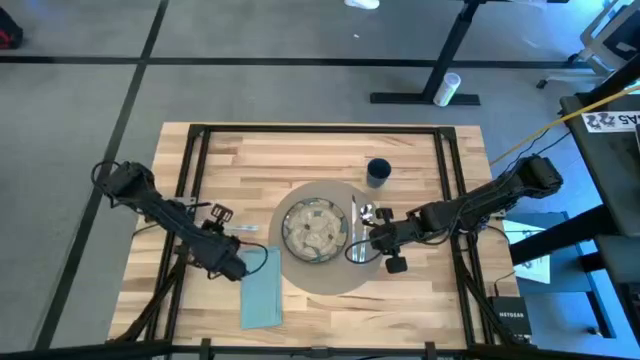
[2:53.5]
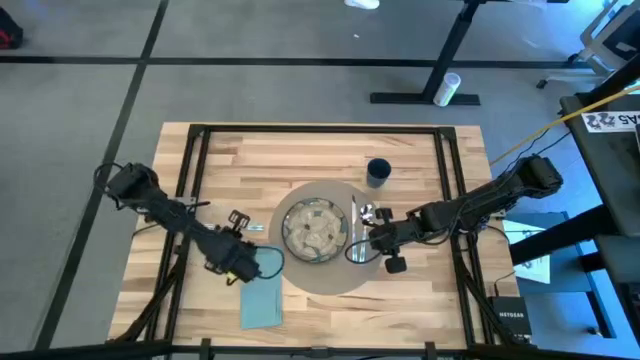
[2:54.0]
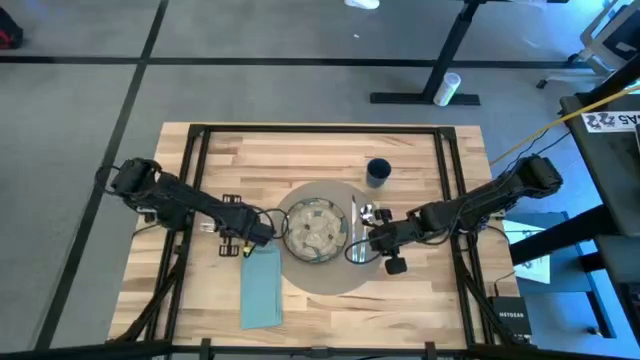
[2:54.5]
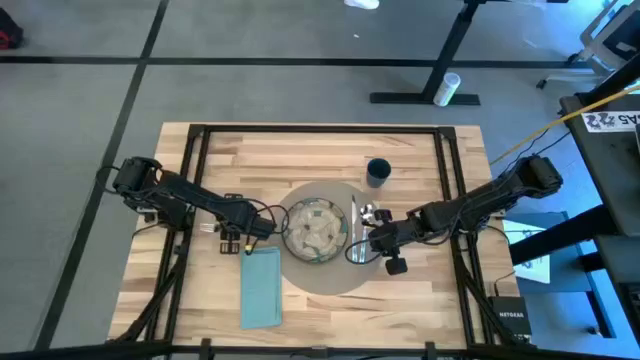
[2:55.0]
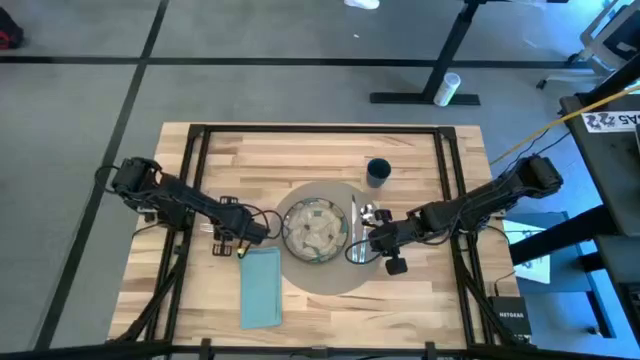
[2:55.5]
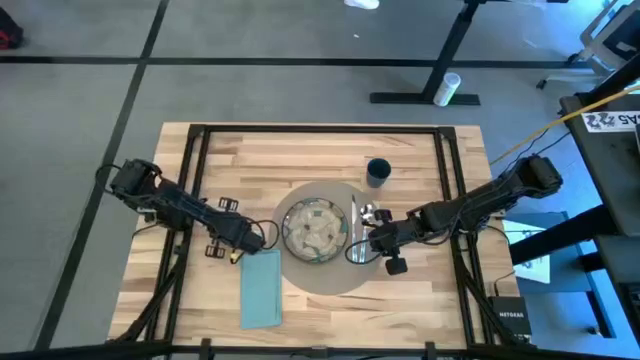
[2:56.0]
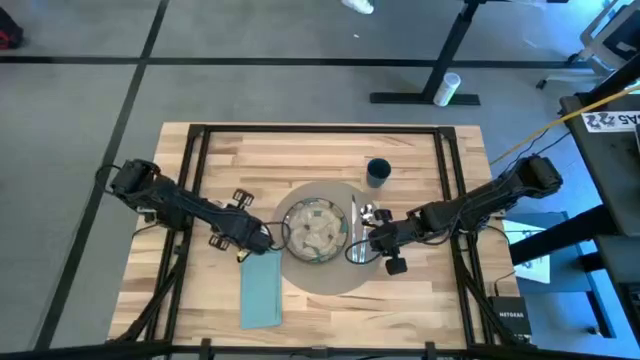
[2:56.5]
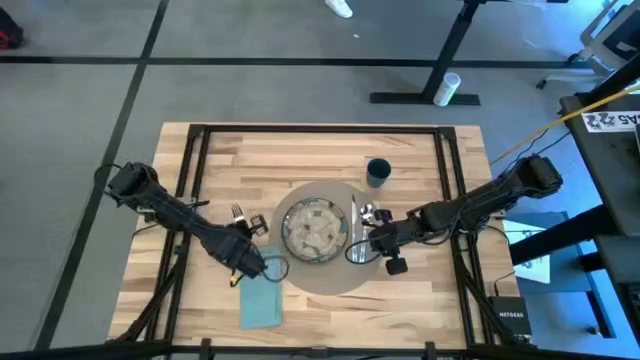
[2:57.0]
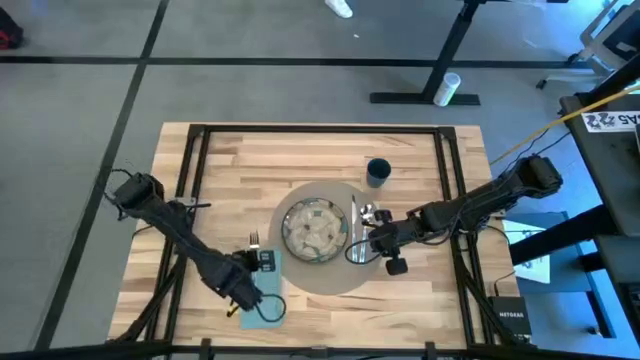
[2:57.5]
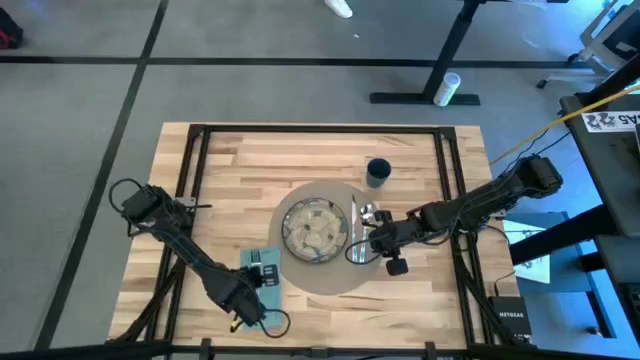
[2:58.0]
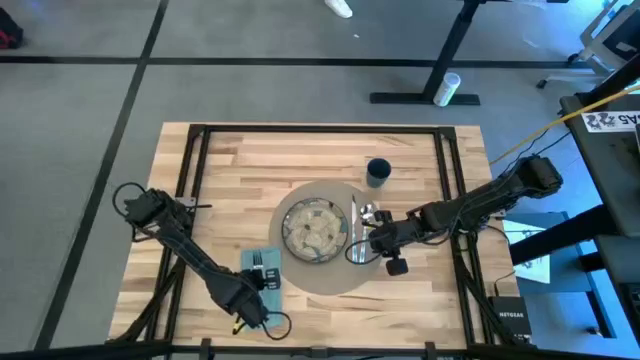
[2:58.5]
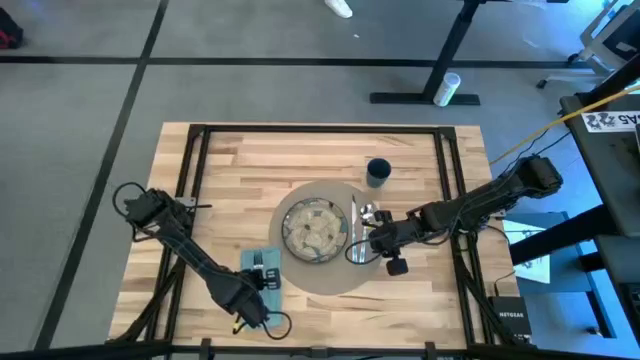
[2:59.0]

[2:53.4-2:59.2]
Task: Set table place
Put the blue patterned fork on top of the blue table napkin

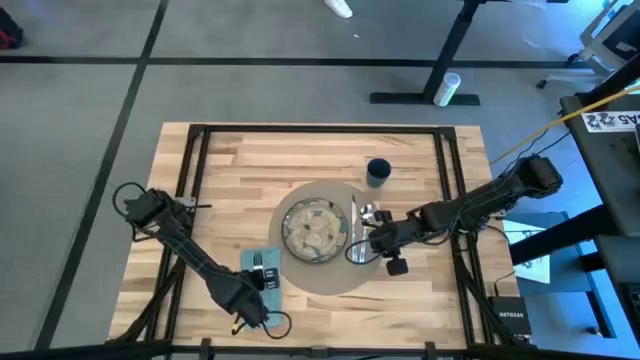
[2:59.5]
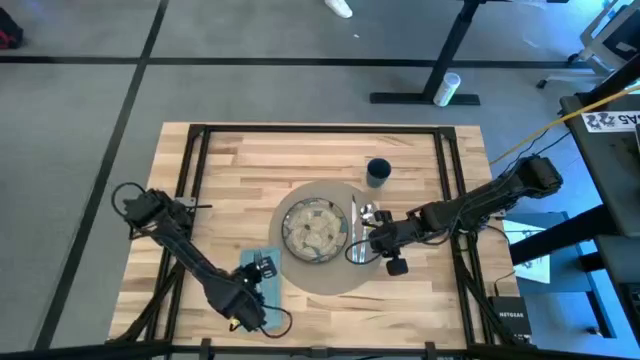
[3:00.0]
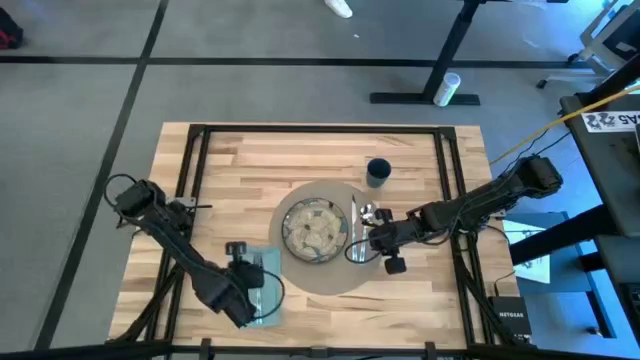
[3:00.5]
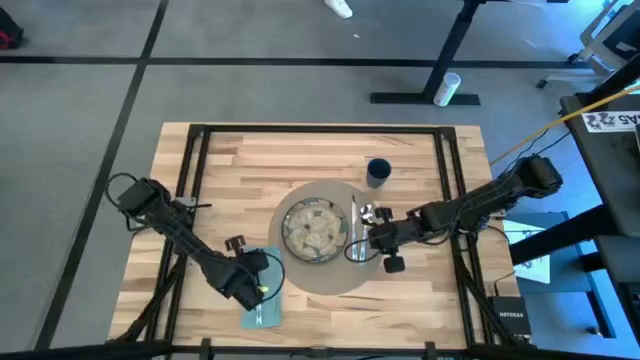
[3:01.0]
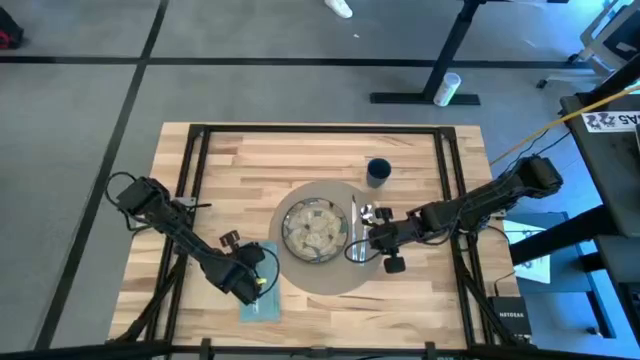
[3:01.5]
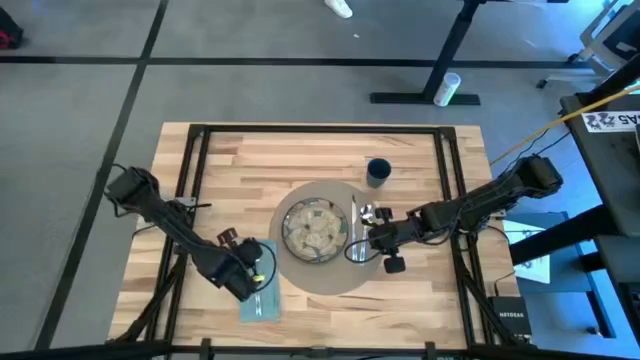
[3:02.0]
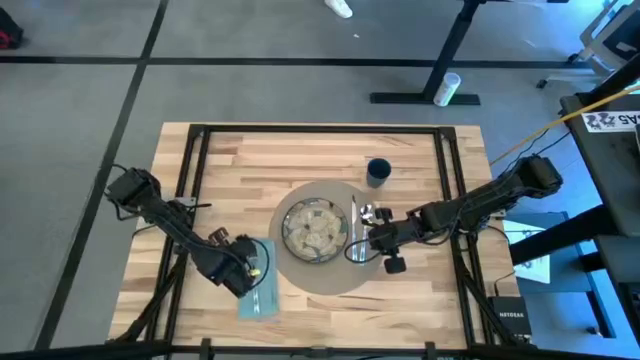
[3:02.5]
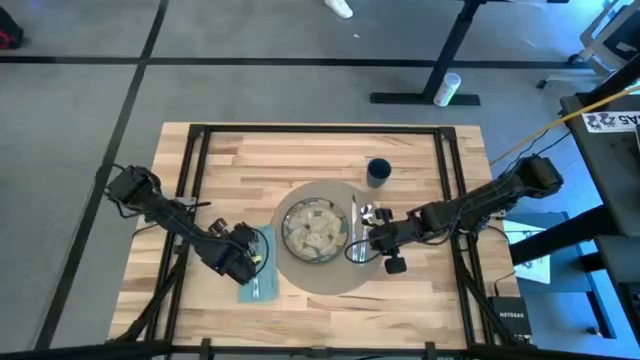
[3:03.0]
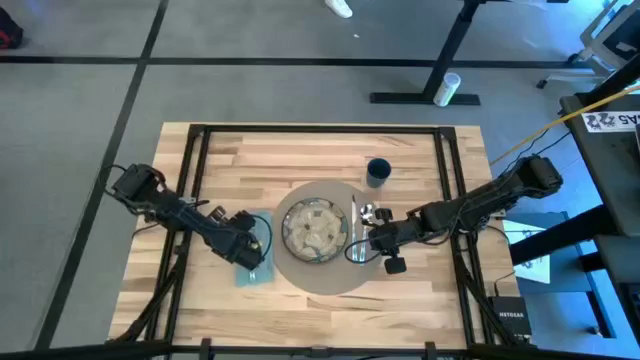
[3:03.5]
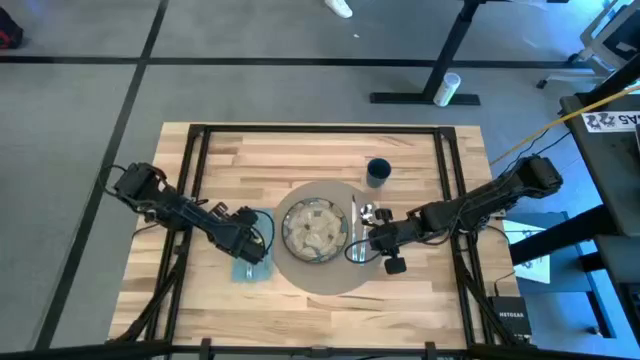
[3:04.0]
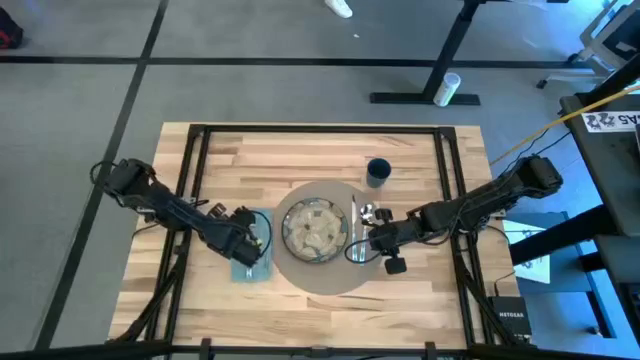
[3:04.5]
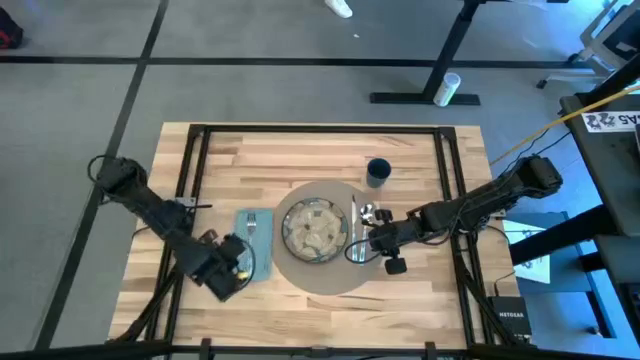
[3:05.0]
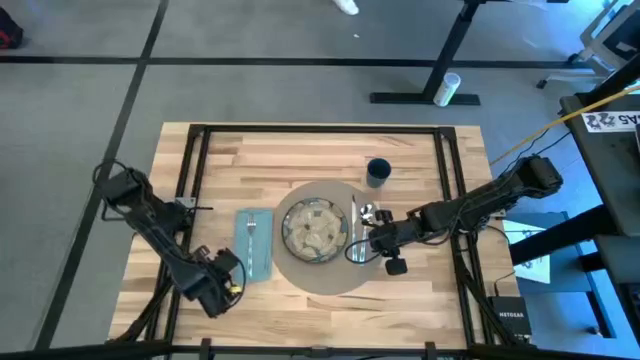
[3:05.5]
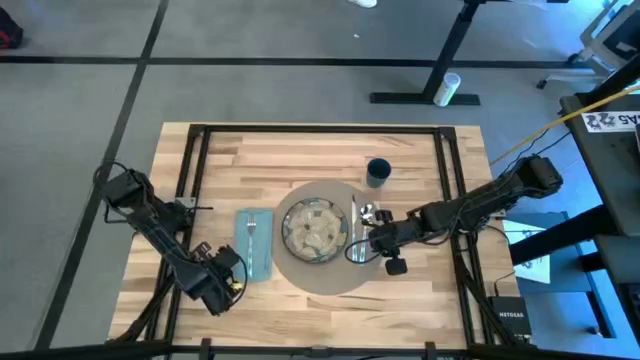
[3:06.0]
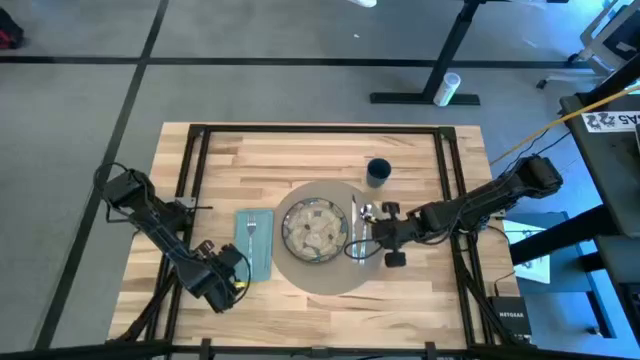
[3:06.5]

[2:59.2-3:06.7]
Adjust the blue table napkin

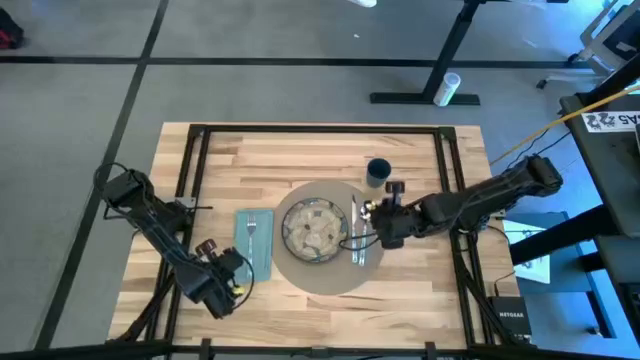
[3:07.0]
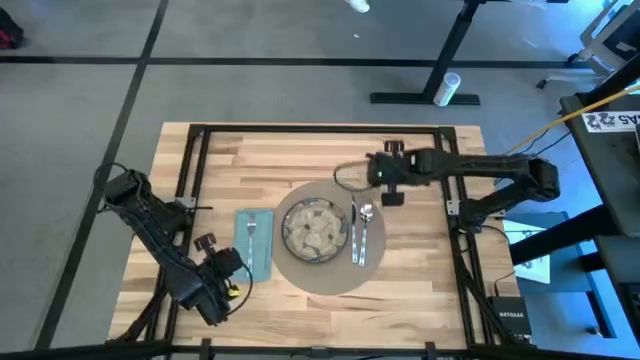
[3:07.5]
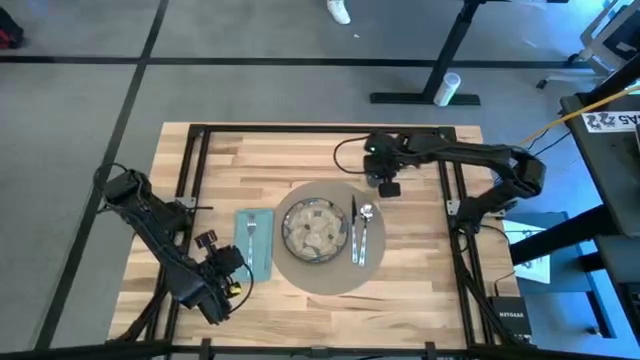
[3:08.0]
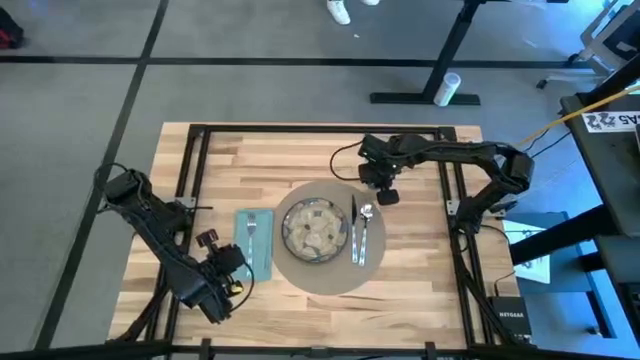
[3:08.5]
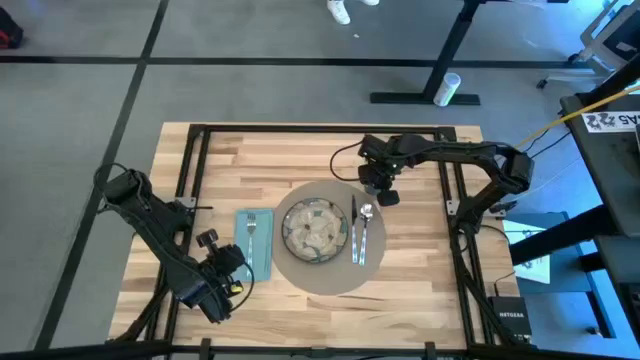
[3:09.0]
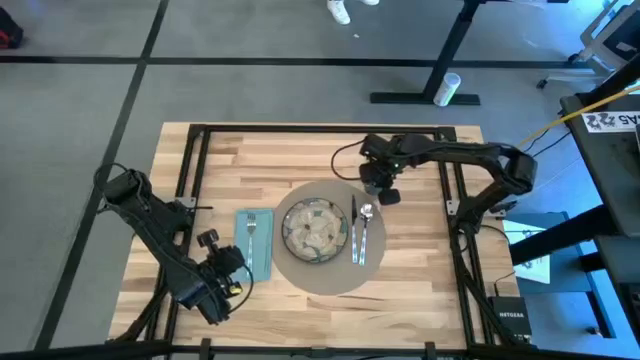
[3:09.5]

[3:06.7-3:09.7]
Adjust the blue cup

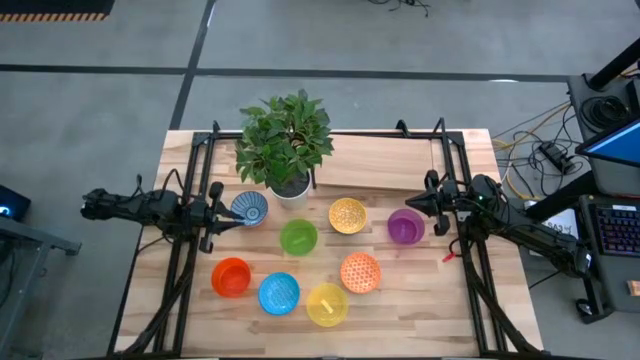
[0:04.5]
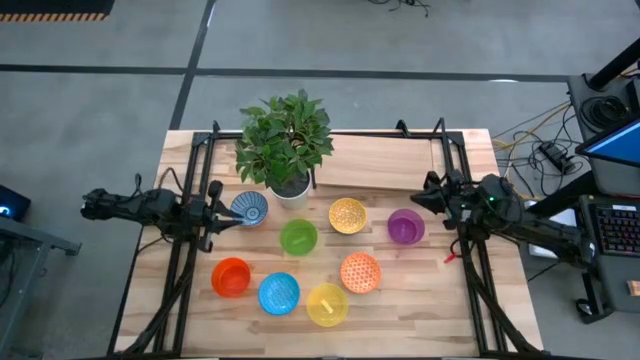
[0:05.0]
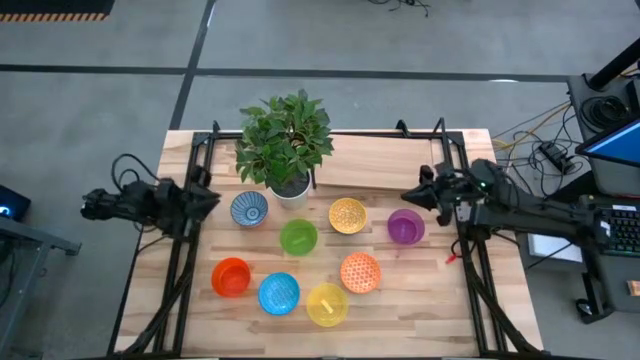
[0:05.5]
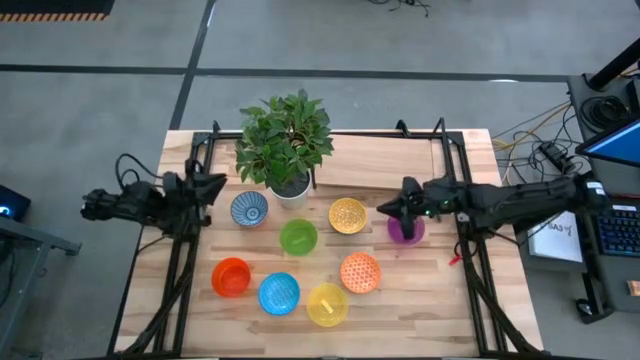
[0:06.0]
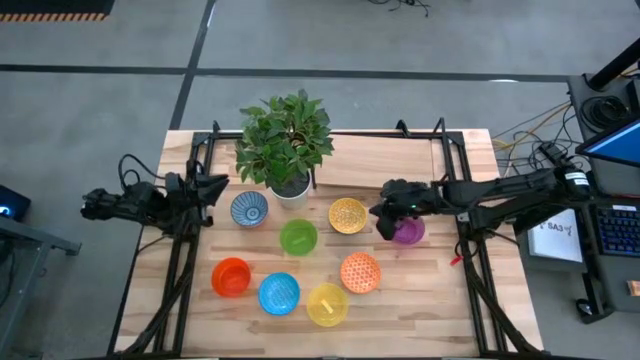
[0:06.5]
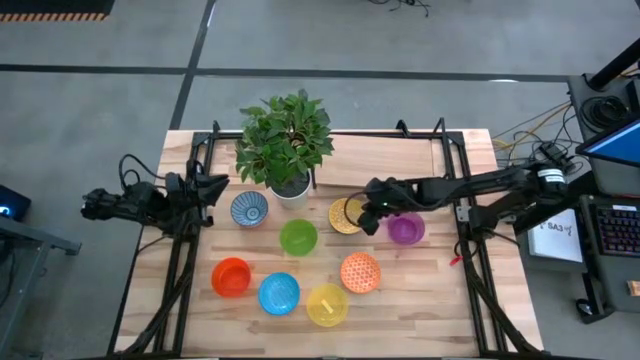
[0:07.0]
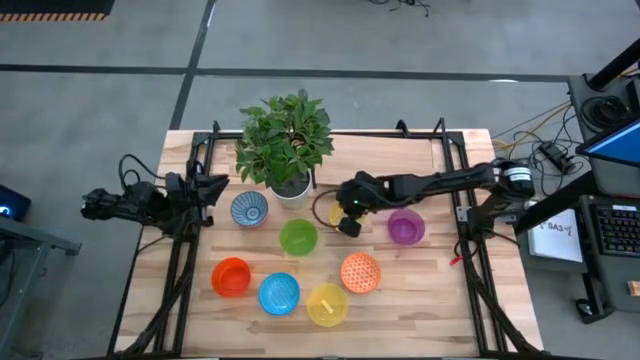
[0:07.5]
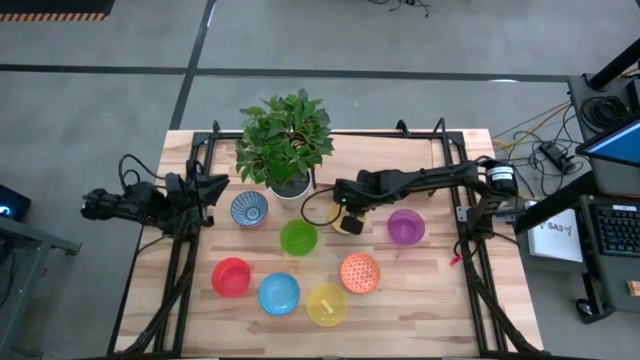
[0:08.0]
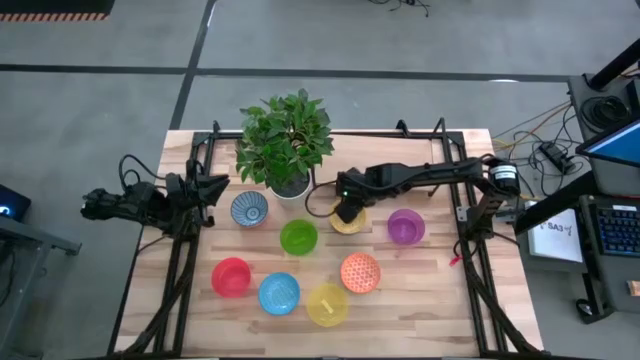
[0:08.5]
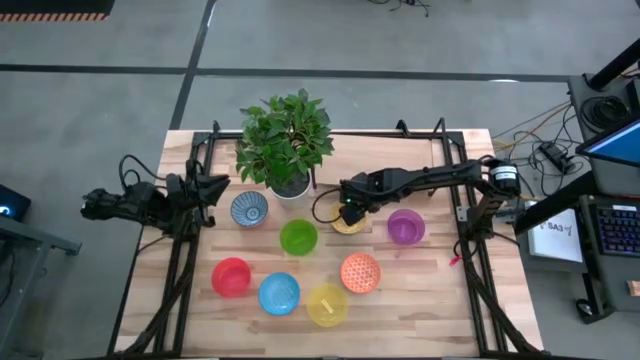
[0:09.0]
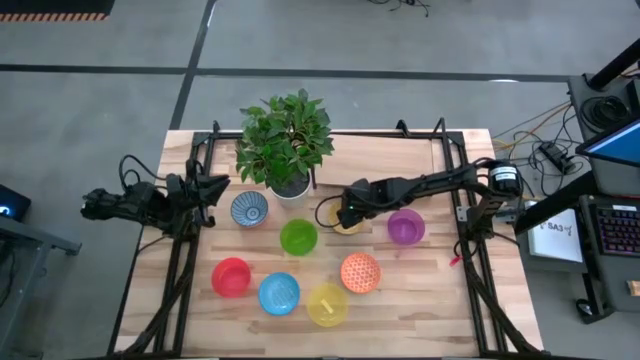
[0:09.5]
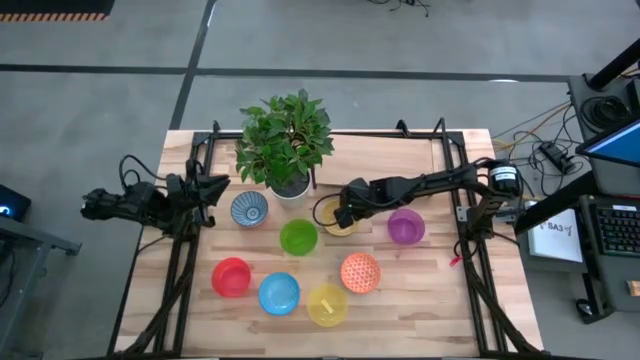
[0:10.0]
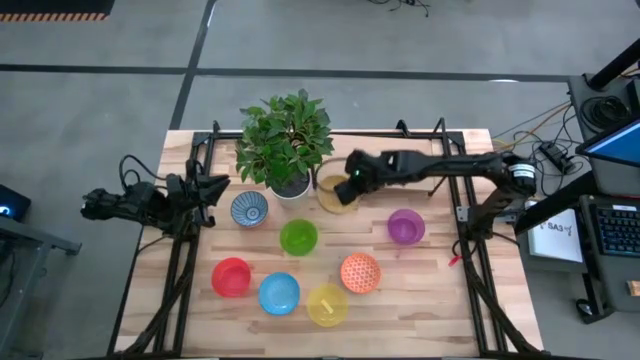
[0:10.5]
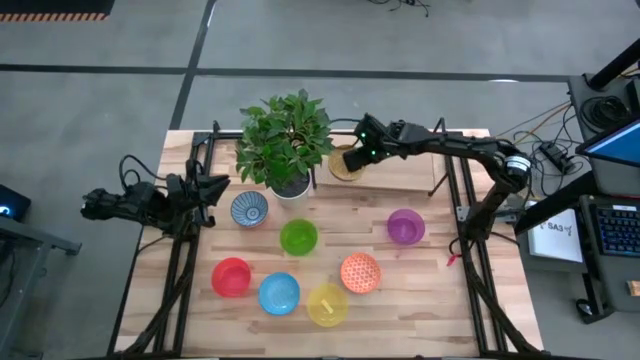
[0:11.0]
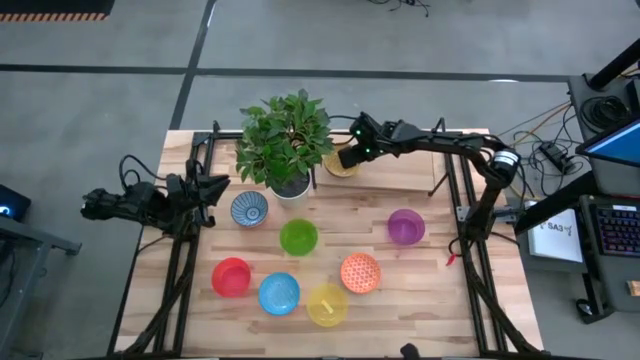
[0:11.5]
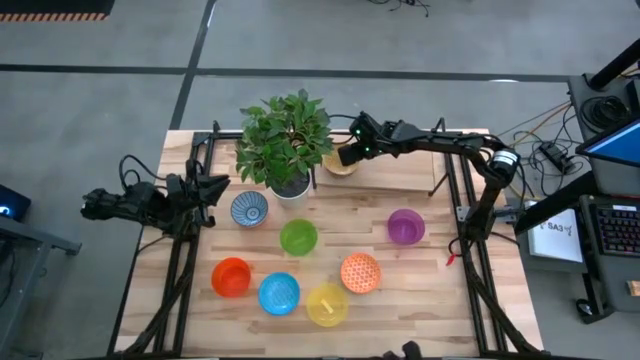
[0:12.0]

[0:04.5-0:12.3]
Task: Place and stack bowls onto a shelf
Put the yellow patterned bowl on the shelf
